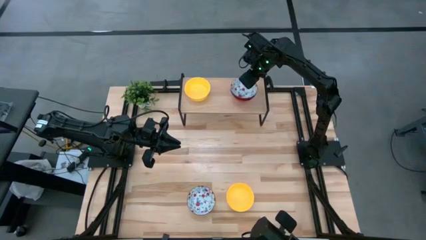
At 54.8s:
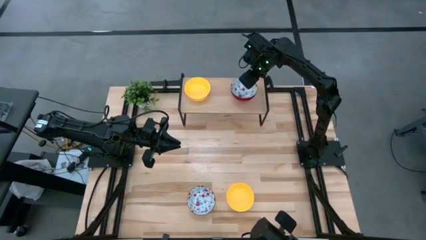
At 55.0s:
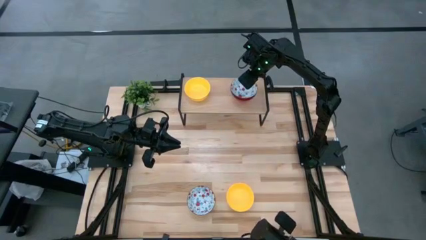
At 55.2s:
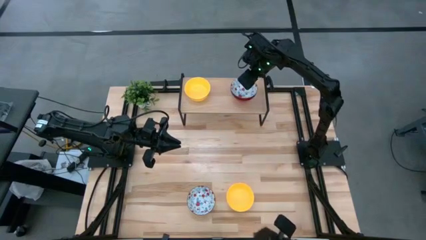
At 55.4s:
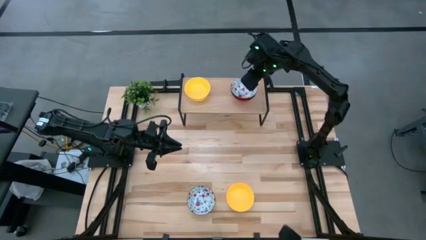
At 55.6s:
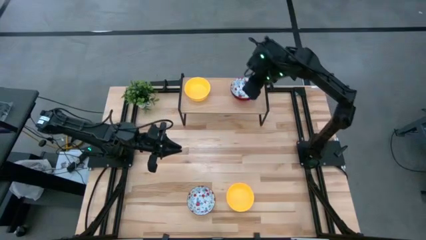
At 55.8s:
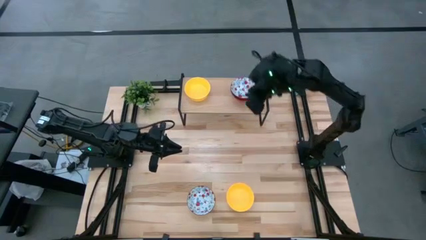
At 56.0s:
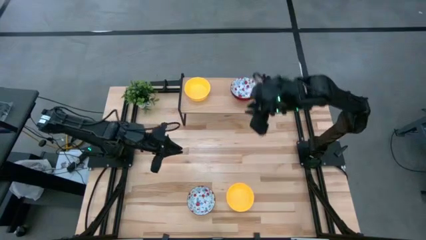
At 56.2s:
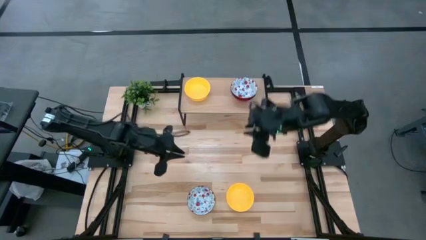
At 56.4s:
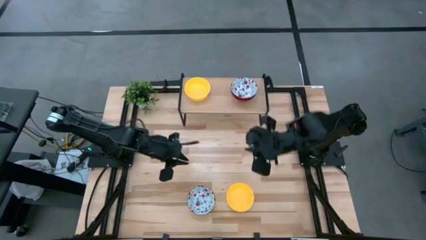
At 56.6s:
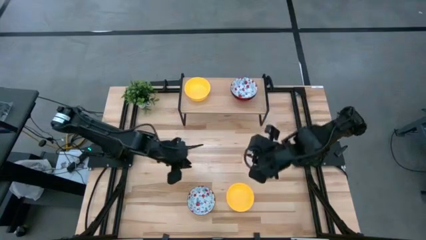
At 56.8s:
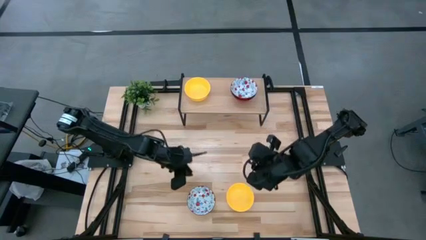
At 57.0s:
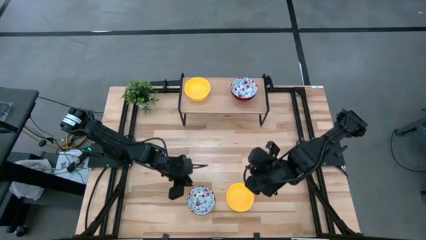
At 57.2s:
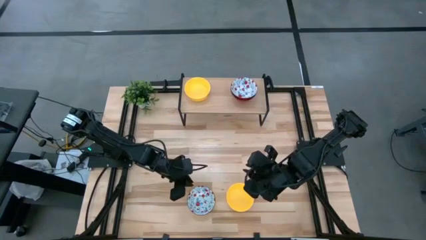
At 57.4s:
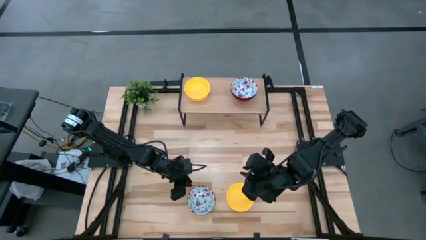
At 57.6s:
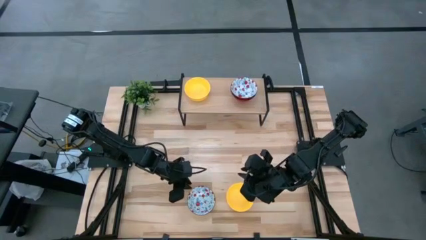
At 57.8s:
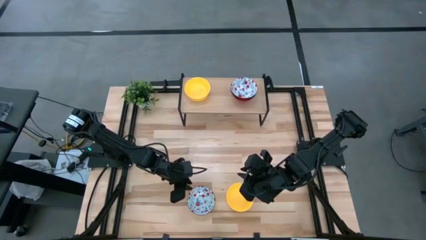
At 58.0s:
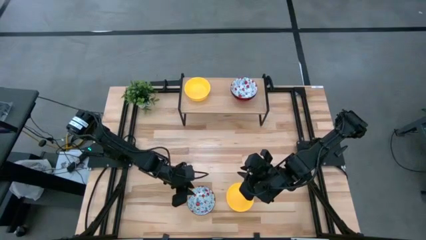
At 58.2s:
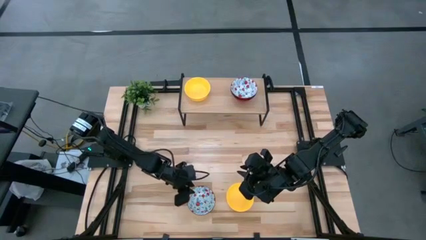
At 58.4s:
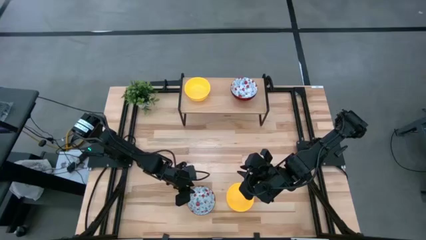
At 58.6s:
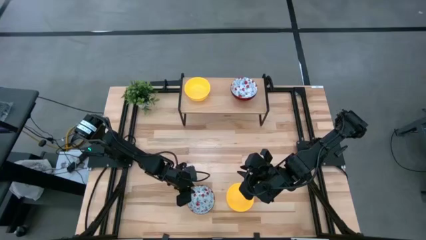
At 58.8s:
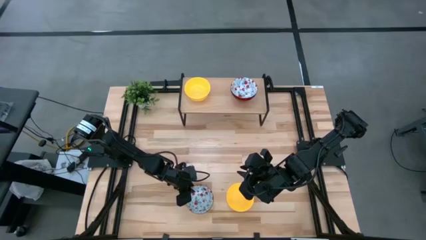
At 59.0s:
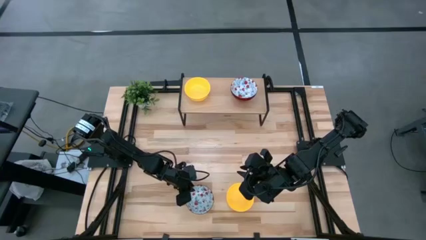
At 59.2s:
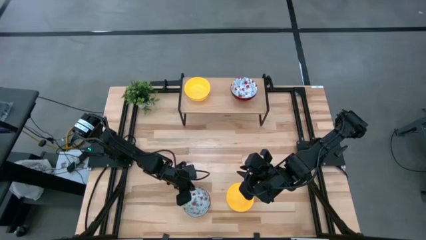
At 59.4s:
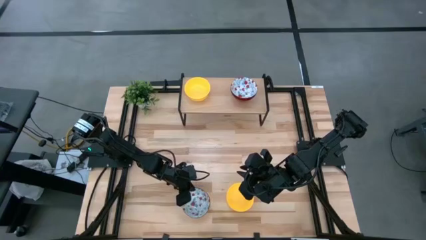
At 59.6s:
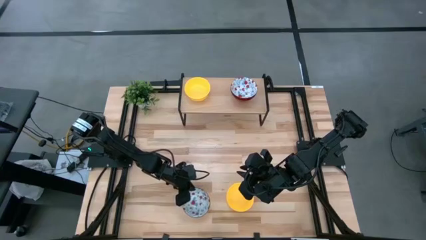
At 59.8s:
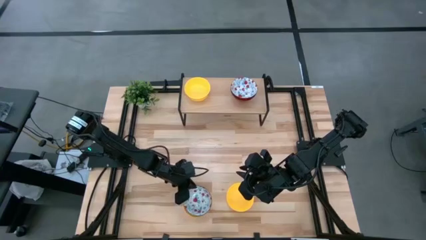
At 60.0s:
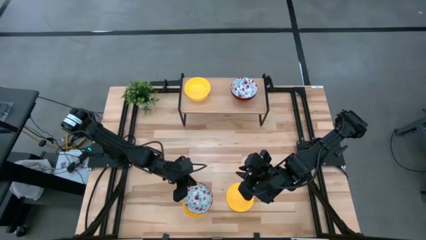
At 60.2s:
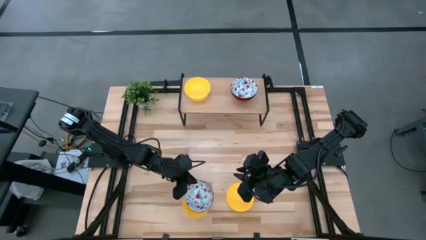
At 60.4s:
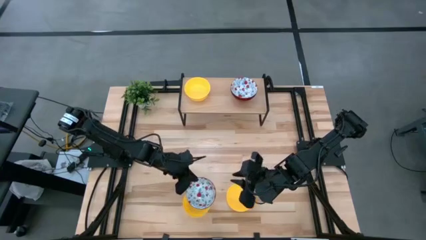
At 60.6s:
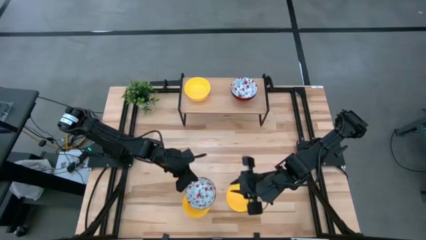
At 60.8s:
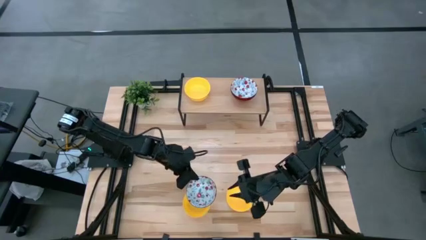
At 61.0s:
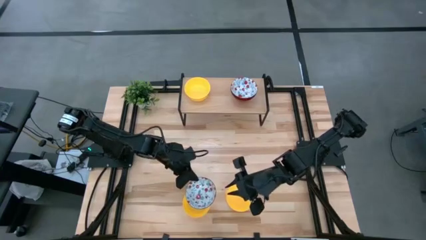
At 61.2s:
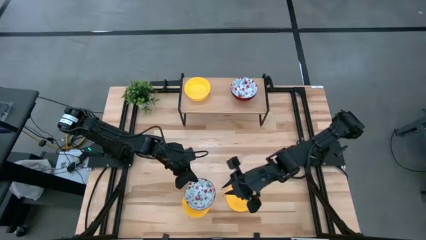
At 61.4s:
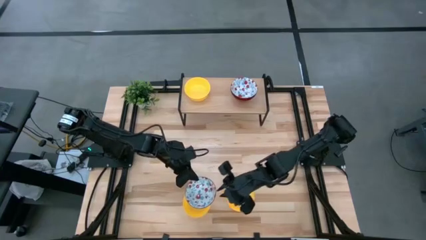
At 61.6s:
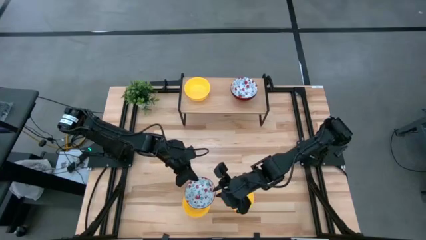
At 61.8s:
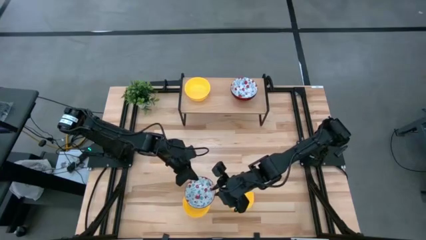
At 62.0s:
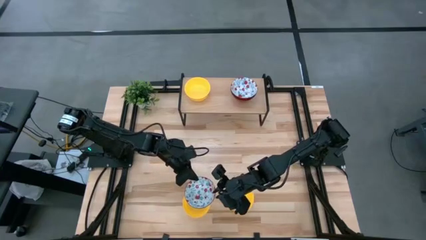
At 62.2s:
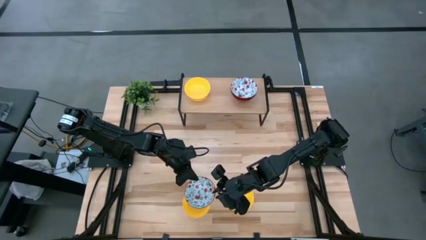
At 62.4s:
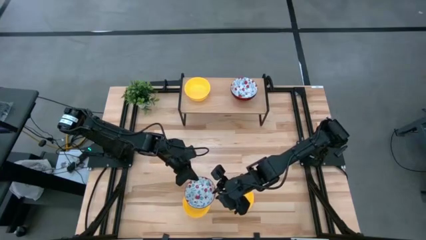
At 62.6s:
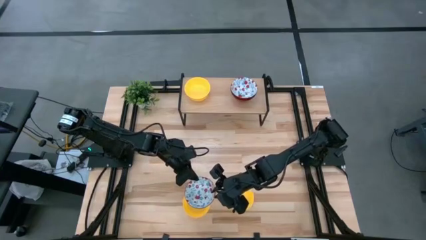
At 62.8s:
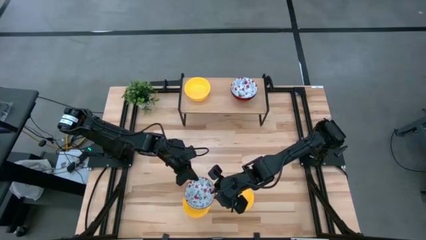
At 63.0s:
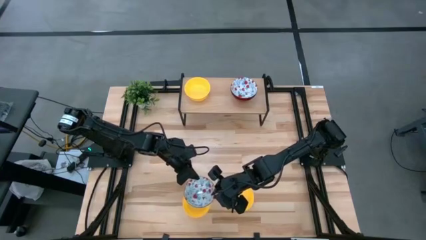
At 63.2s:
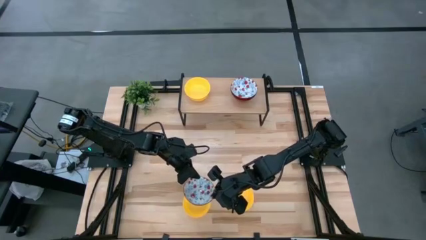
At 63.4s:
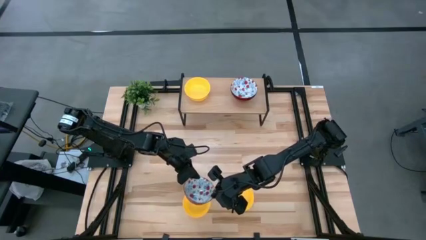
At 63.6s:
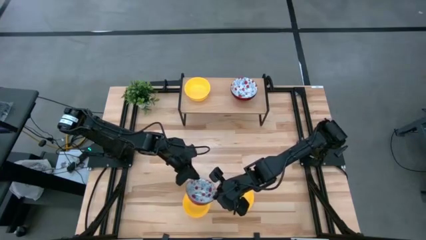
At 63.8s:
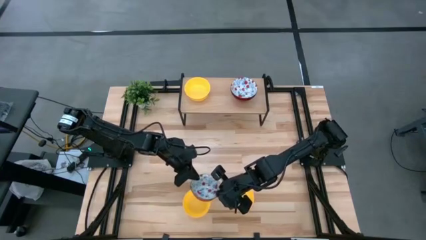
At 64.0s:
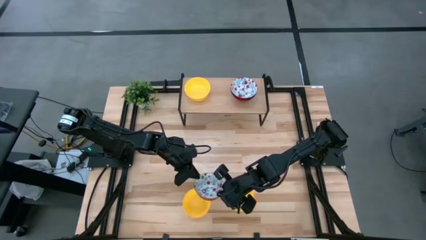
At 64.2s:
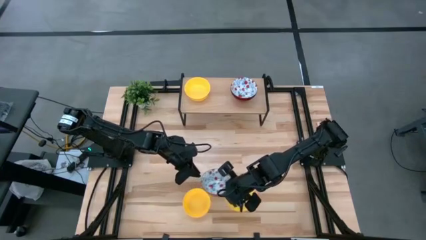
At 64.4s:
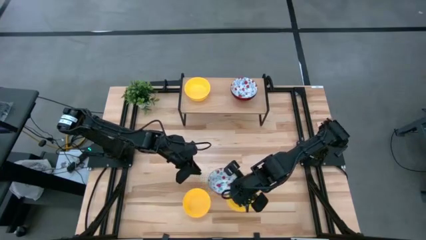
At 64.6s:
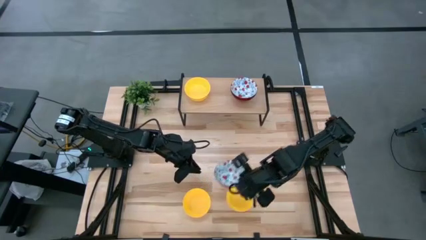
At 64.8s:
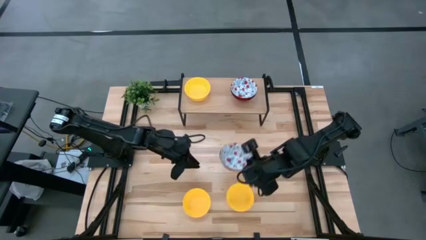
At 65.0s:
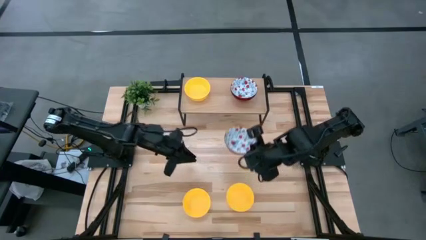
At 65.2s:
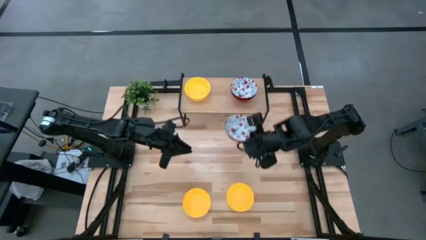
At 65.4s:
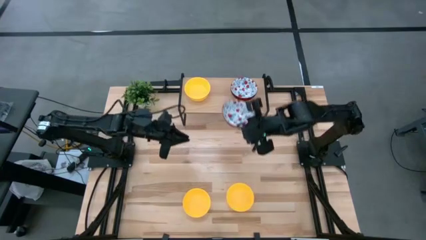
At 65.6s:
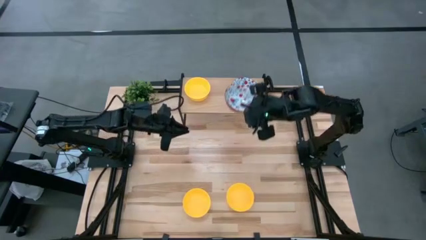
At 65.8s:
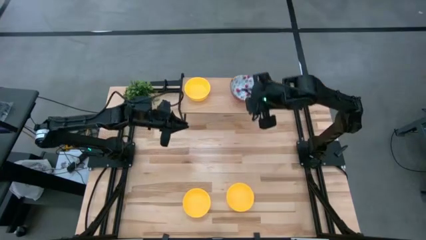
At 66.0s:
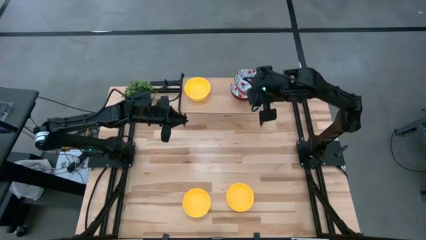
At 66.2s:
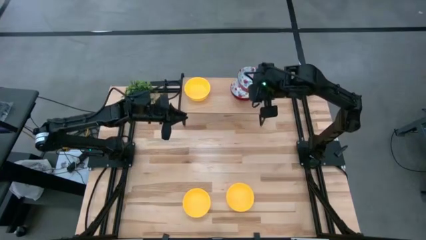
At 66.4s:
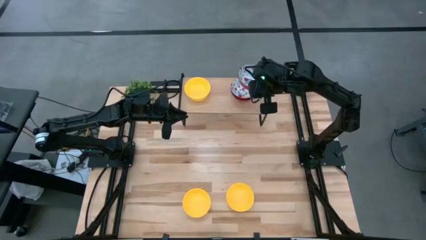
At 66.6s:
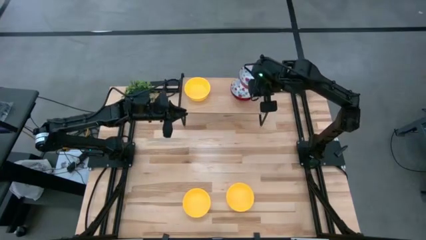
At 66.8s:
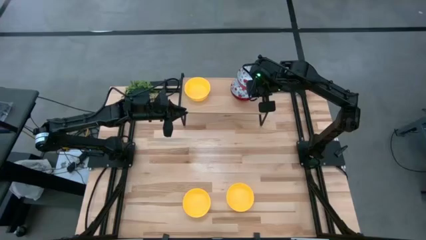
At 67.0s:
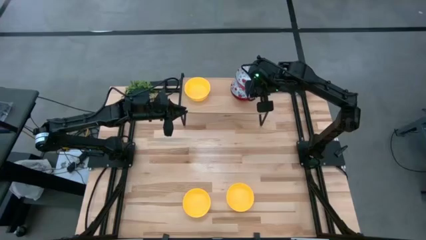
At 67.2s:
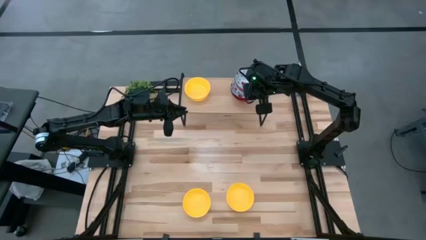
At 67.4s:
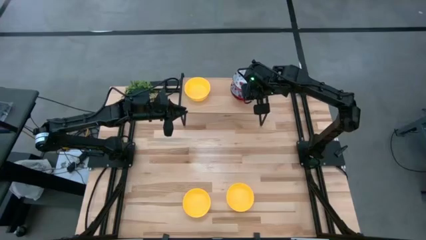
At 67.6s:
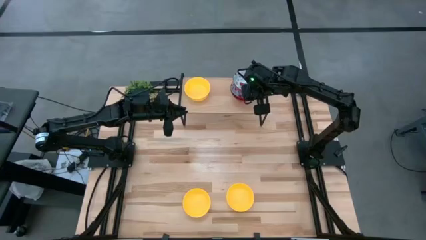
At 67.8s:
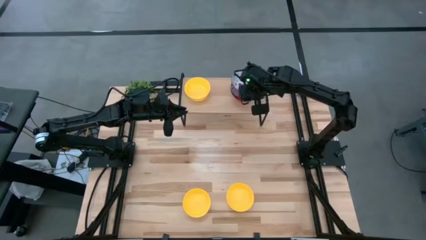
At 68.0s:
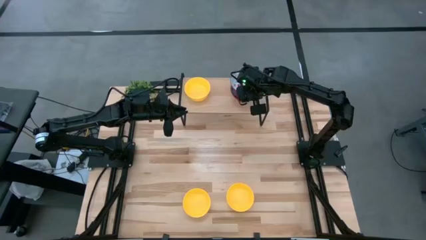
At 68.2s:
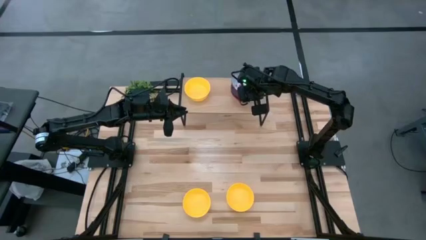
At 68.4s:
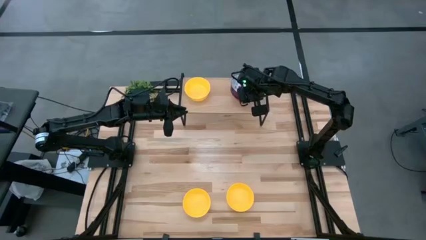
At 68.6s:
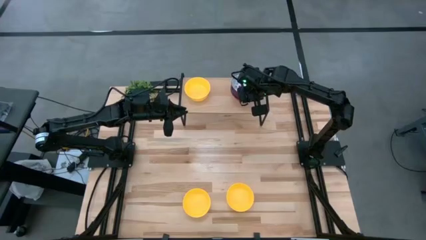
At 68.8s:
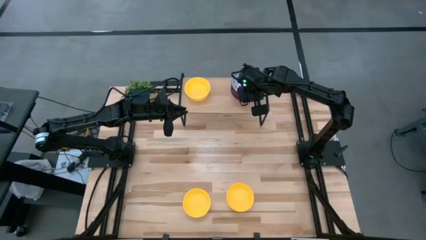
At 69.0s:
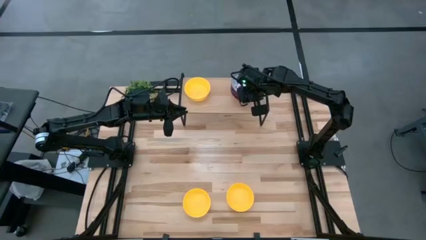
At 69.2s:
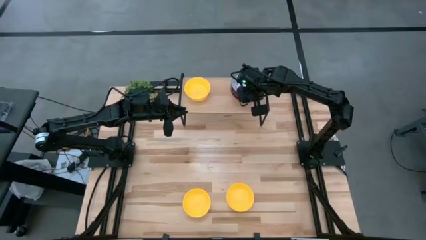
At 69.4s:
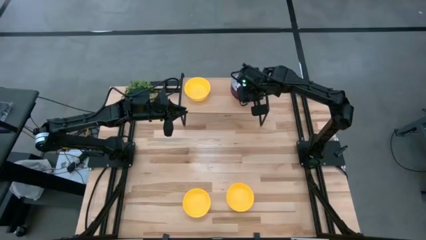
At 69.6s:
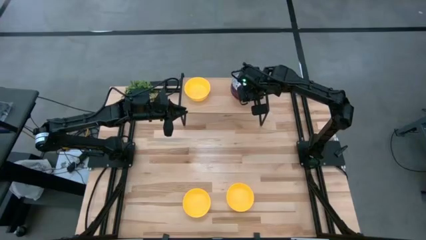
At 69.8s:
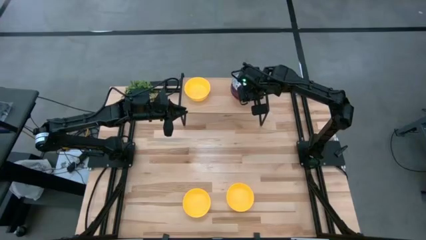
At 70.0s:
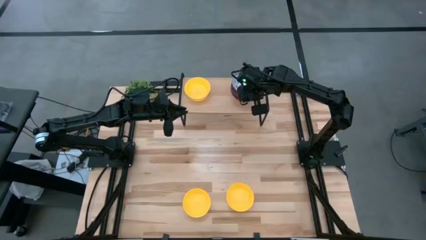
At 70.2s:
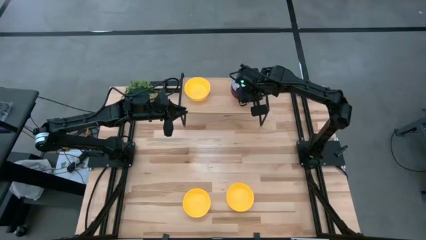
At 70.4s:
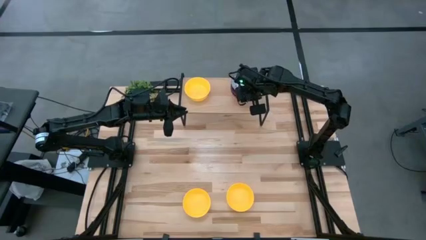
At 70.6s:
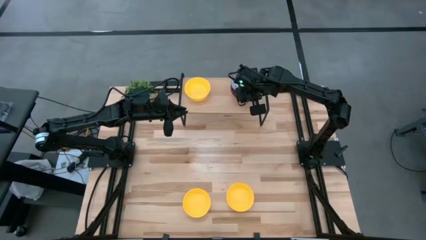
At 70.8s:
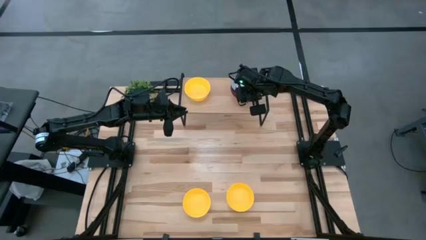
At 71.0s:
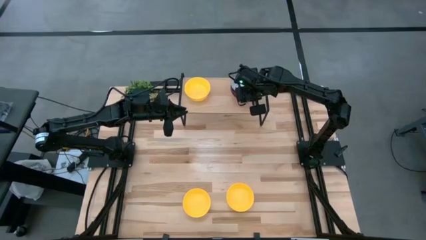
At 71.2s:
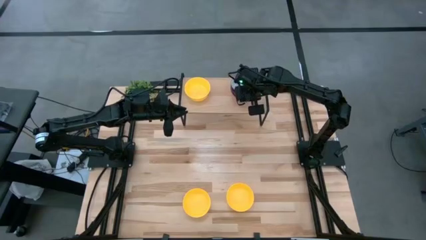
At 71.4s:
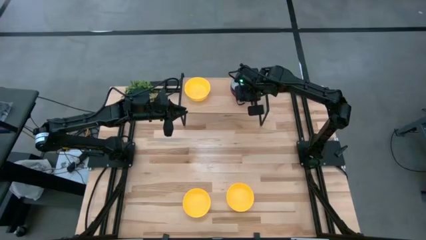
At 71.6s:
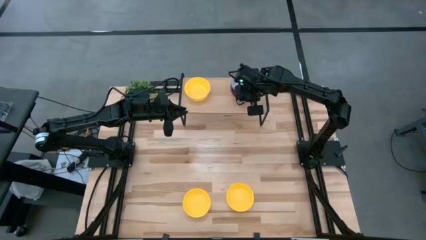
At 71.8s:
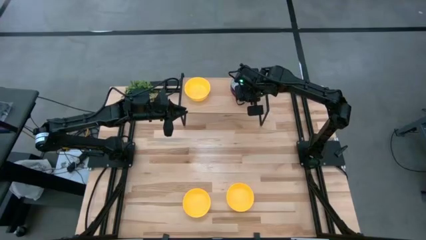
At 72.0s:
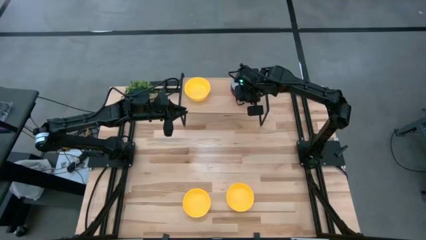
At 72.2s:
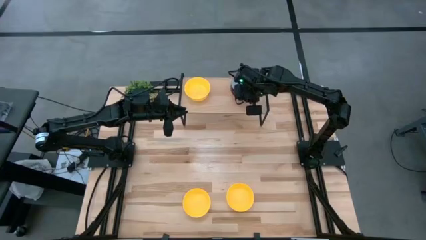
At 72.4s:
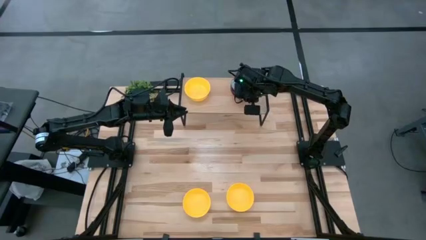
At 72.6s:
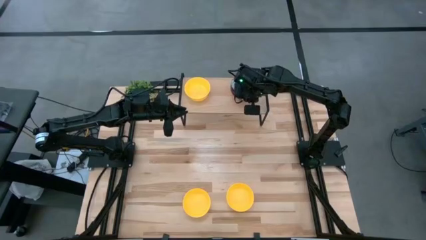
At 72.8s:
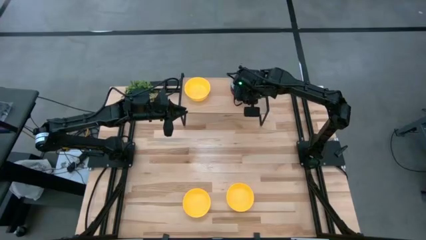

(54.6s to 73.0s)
Task: Pick & Place Mini bowls
Stack the white bowl on top of the white bowls on the shelf
